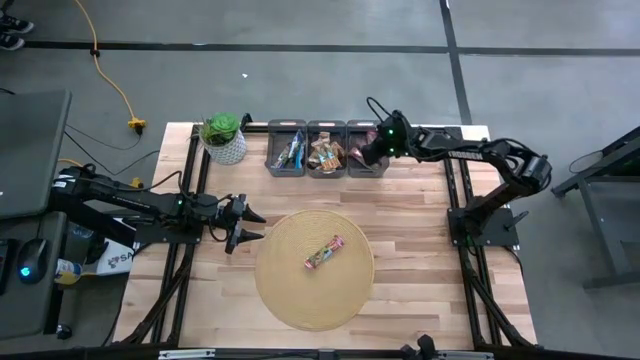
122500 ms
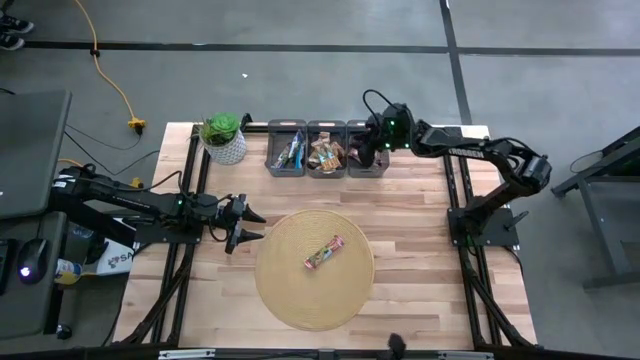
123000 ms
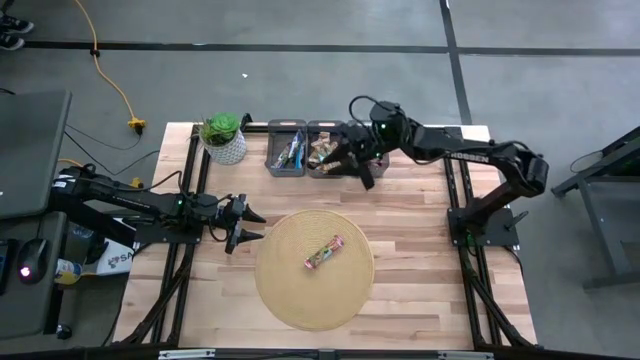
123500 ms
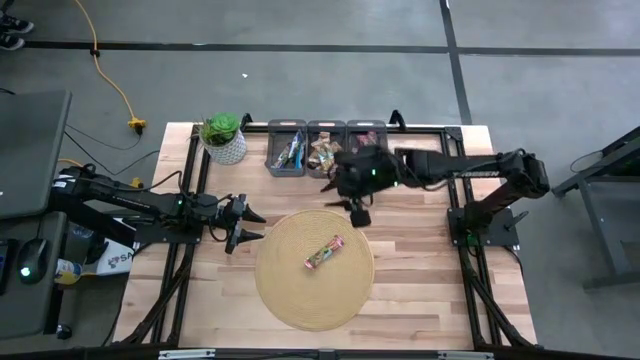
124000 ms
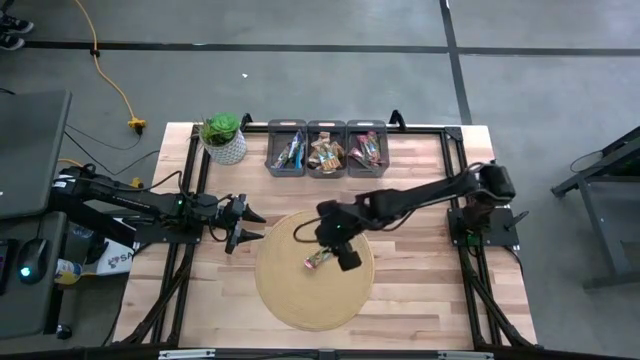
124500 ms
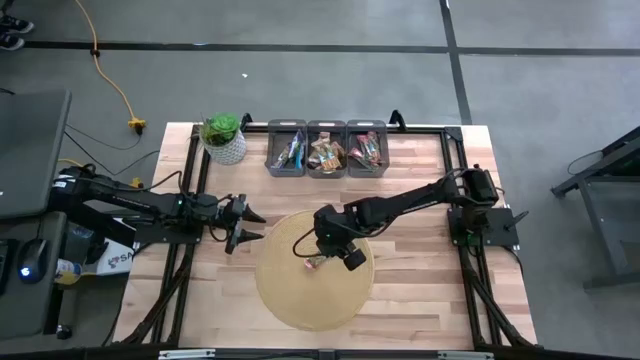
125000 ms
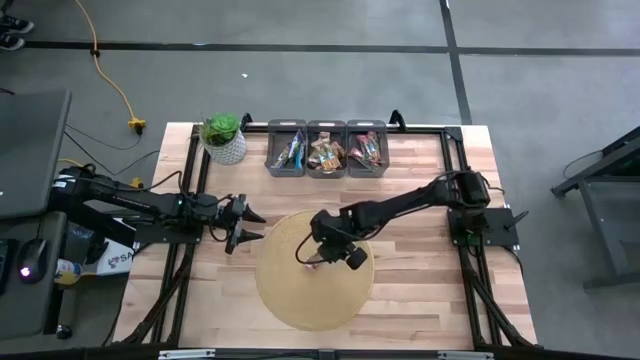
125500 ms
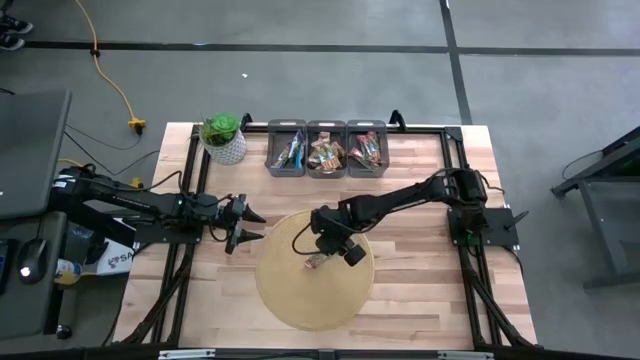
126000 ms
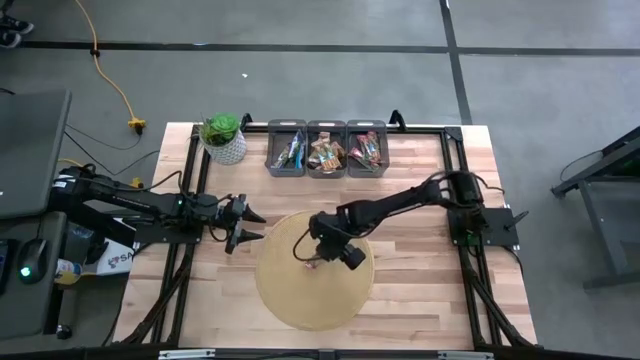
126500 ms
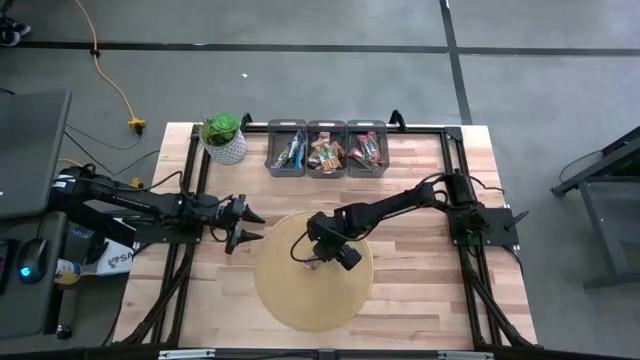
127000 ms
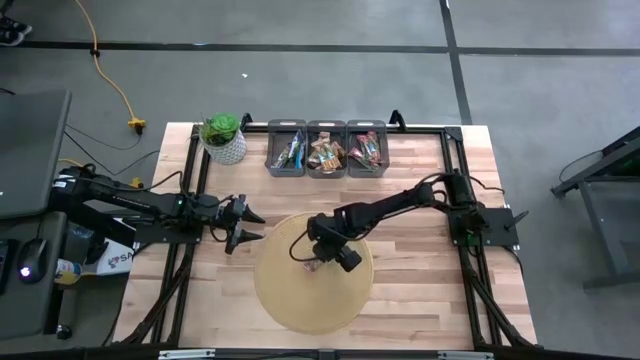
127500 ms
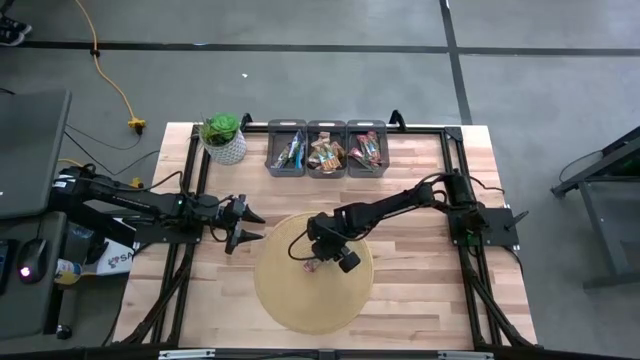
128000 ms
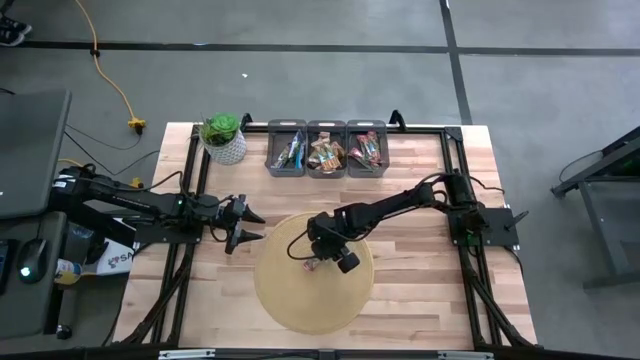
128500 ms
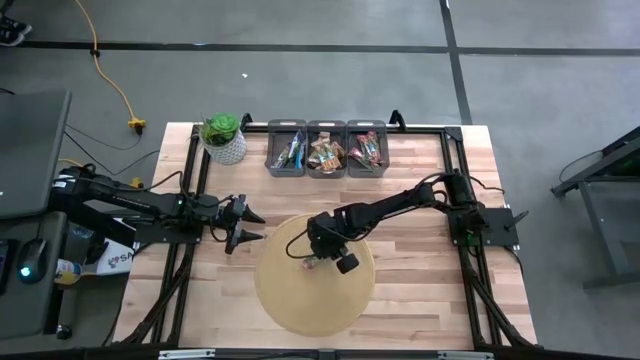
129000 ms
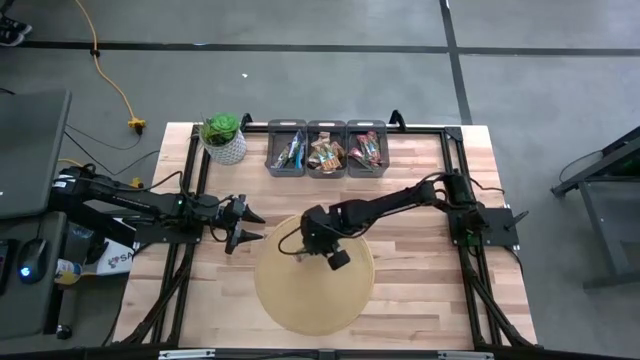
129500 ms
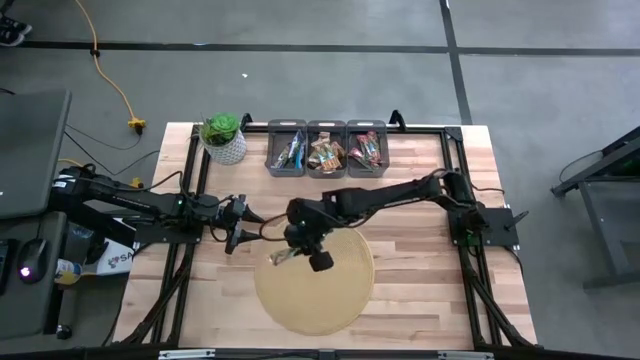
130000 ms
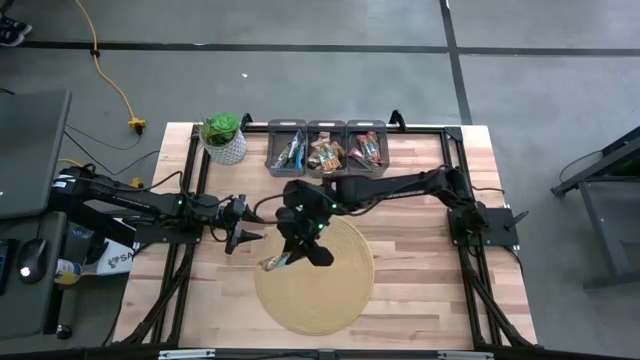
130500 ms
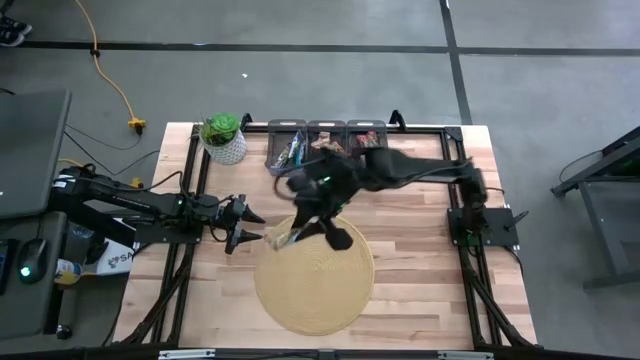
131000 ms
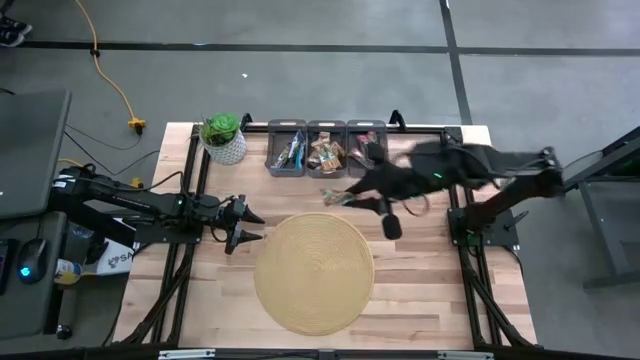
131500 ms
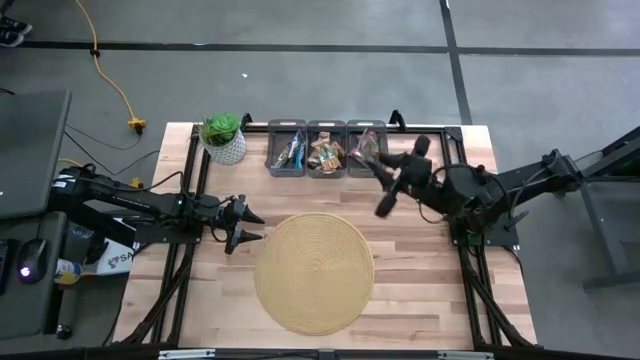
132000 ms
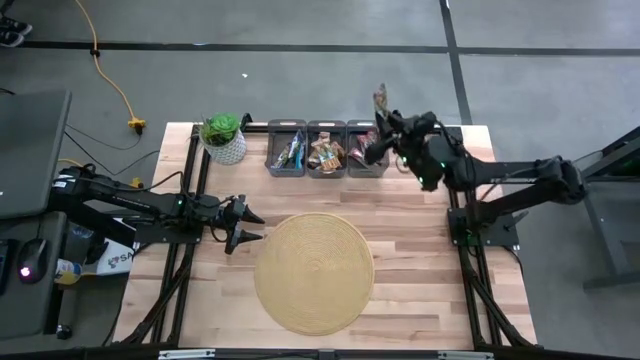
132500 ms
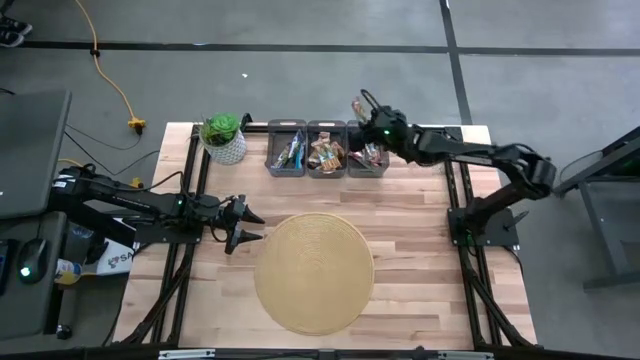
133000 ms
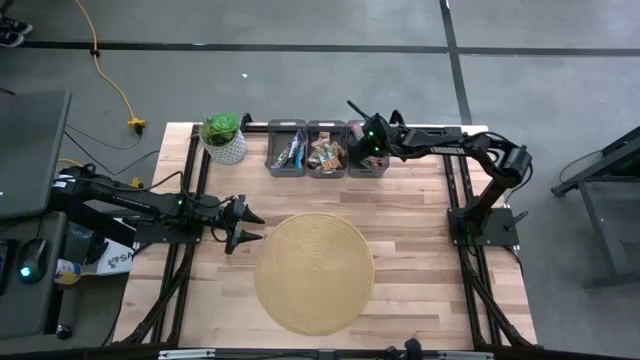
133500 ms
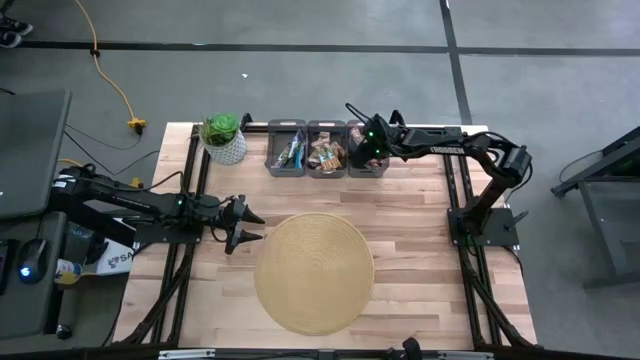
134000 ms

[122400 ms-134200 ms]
Task: Pick and place Granola Bars by type
Put the red granola bar into the right black bin

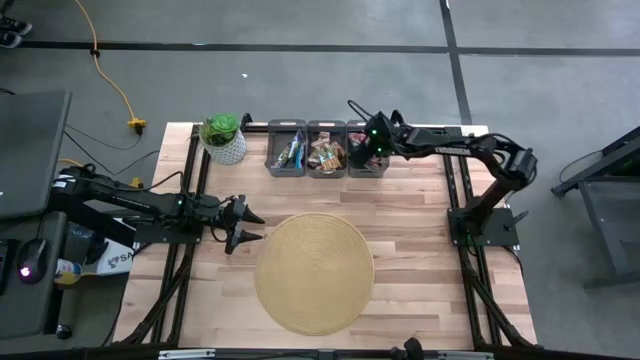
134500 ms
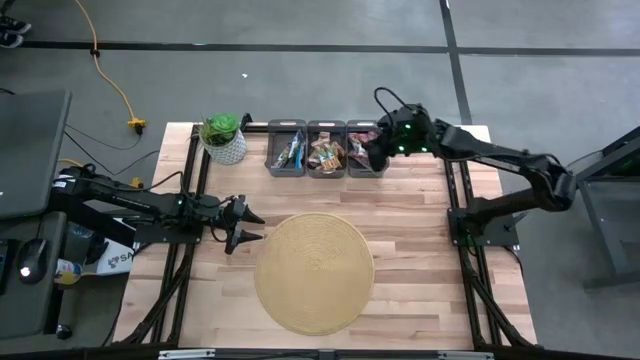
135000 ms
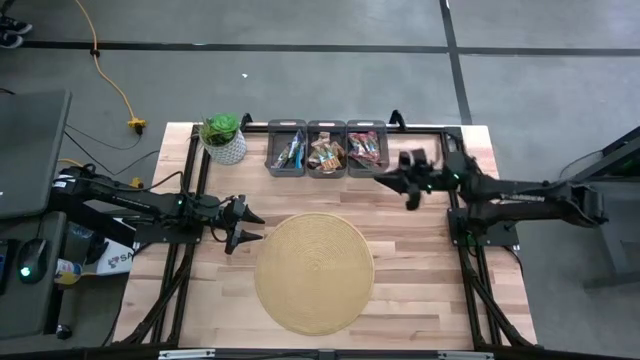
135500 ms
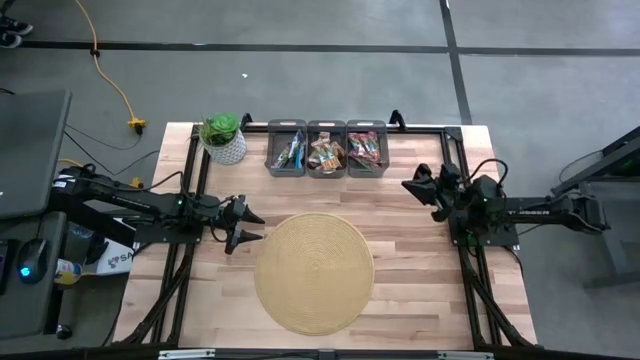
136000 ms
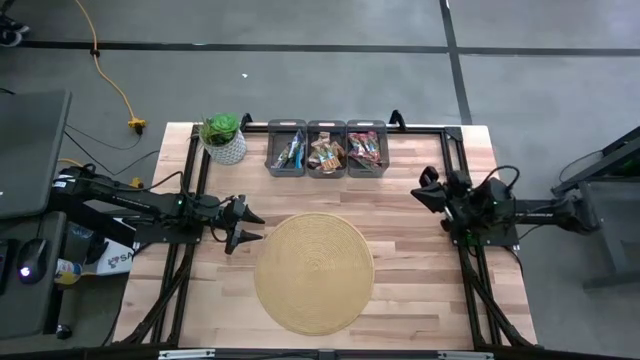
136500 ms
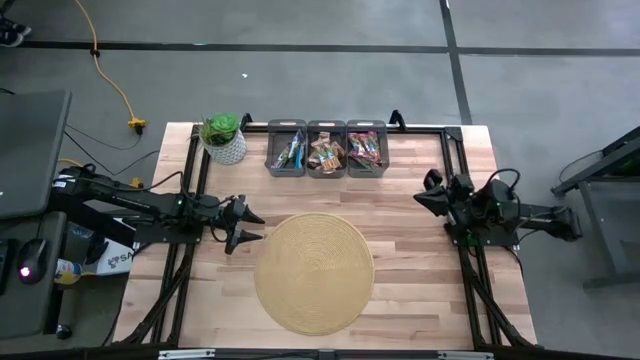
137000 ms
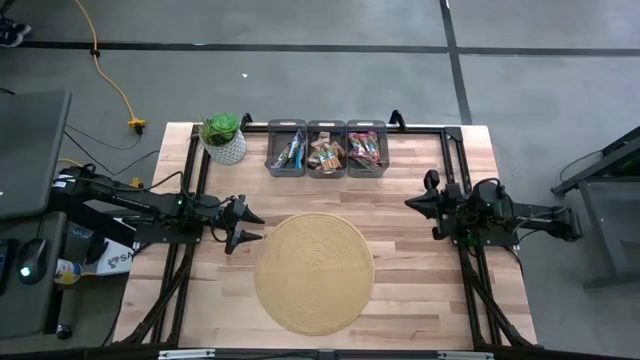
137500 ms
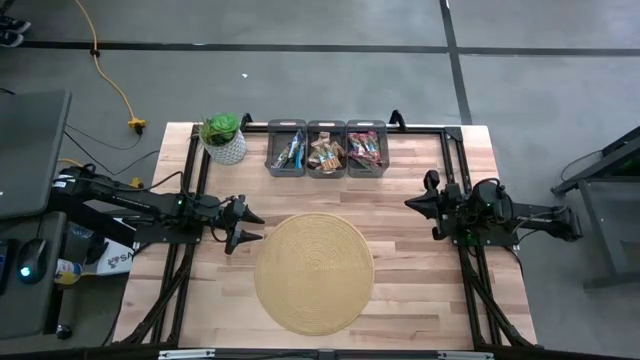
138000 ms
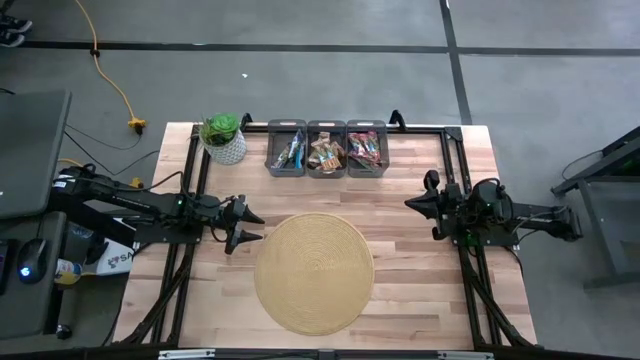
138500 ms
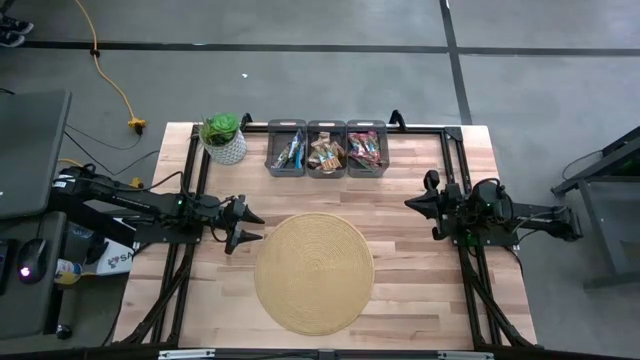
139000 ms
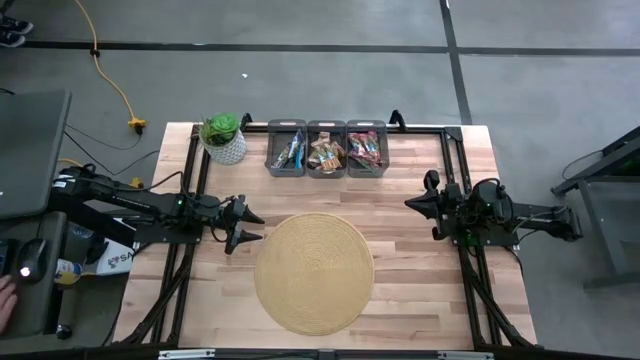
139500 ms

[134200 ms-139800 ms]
Return to Home Position

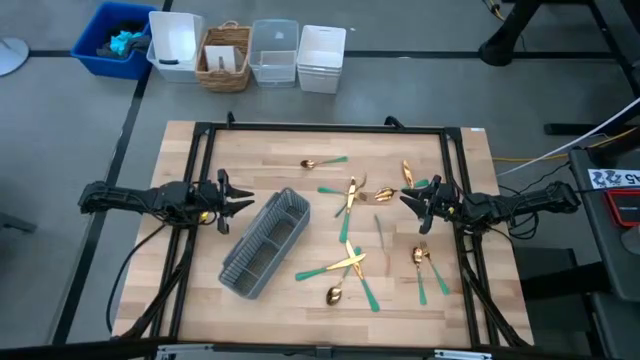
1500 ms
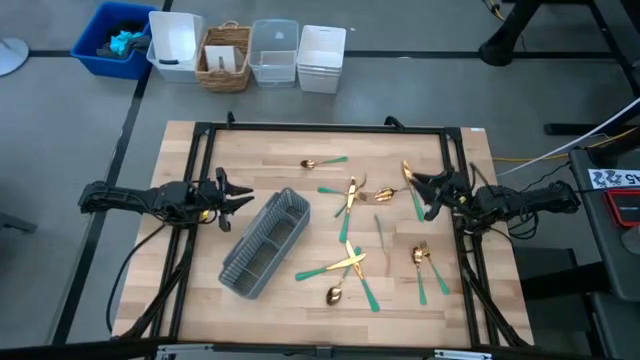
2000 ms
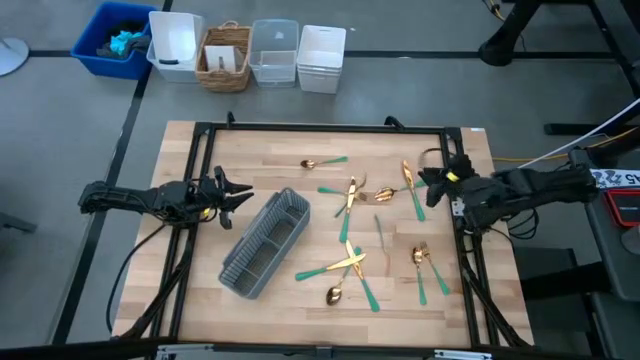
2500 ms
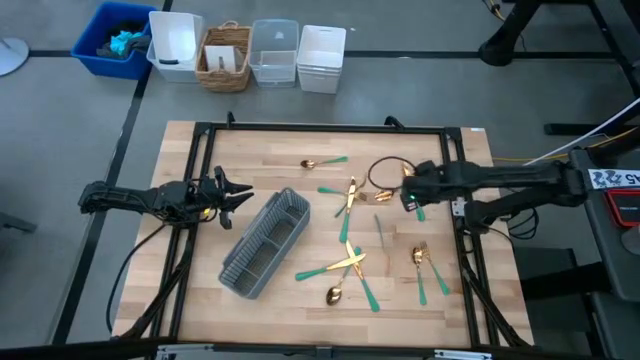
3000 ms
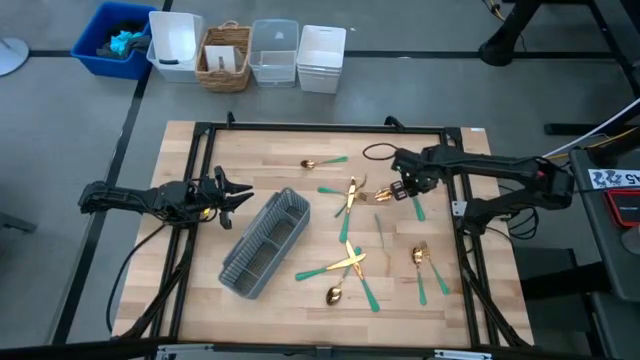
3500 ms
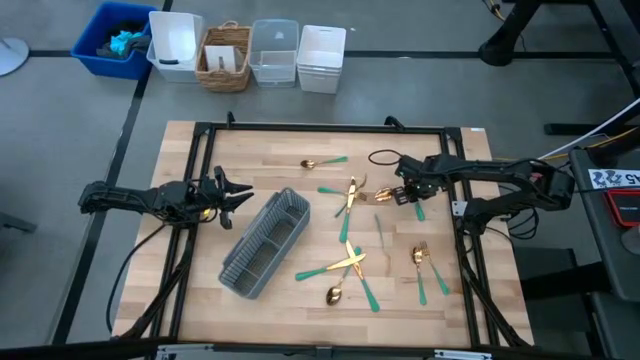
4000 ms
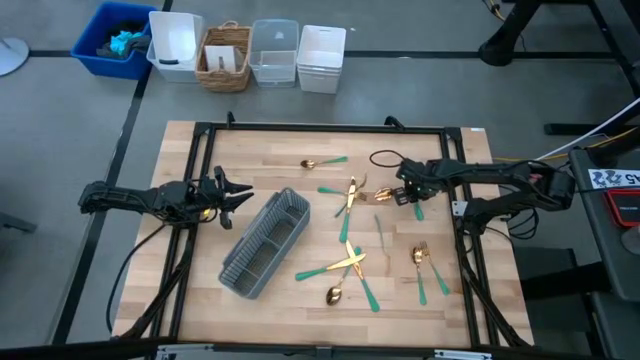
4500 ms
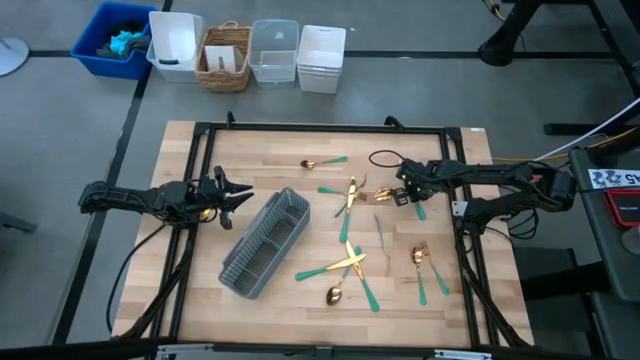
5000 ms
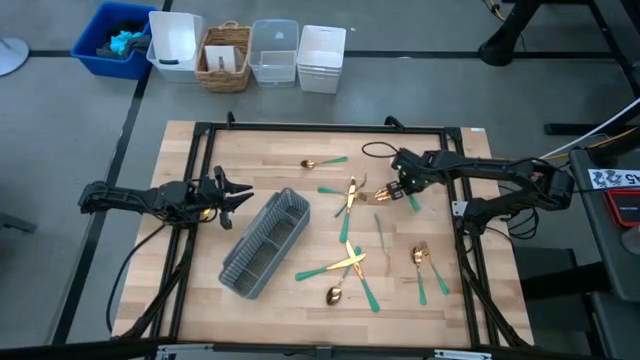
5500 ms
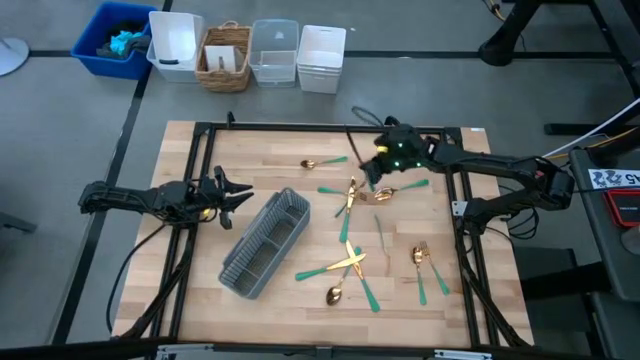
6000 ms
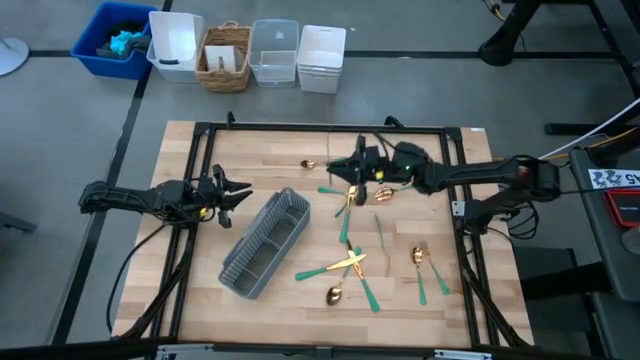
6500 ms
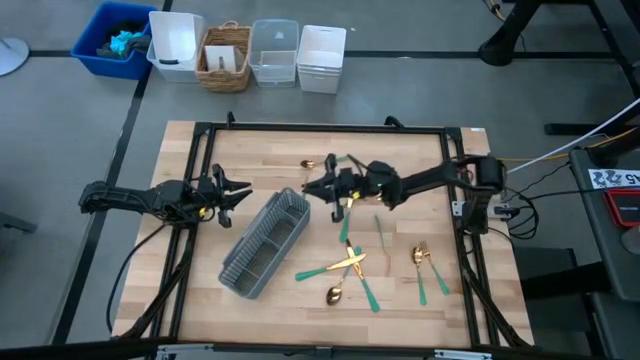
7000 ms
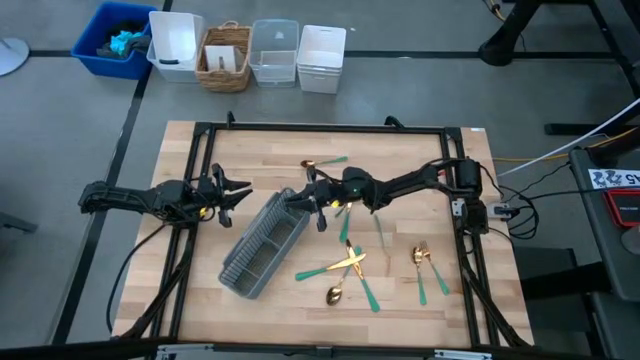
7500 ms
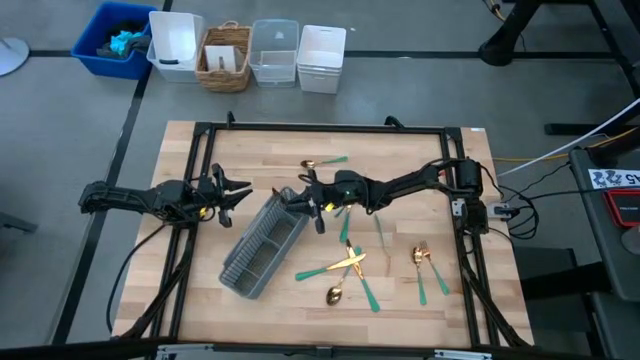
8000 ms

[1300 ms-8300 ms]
Task: Sort silverware
Put the green knife into the silverware basket
